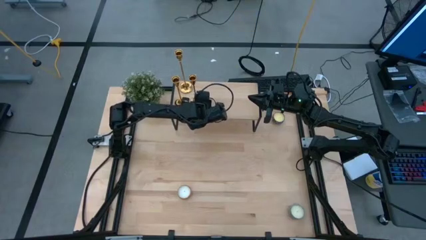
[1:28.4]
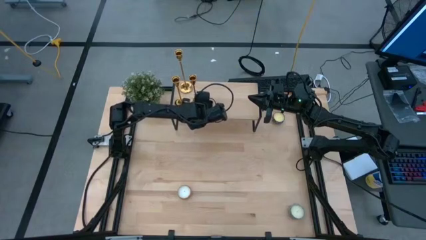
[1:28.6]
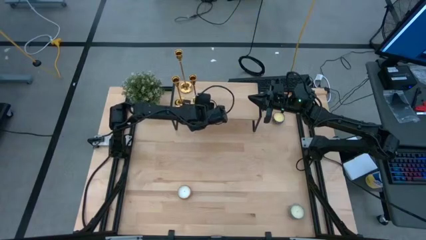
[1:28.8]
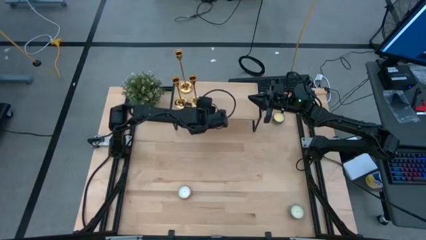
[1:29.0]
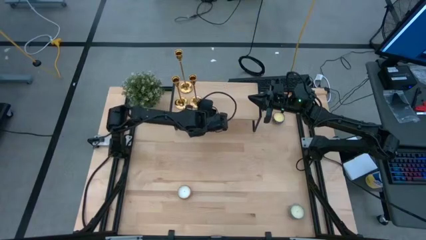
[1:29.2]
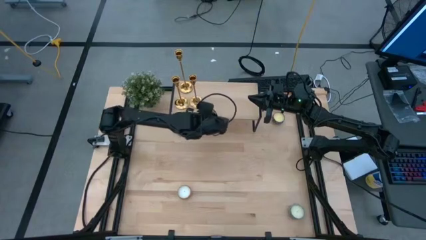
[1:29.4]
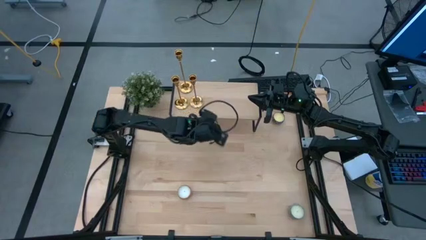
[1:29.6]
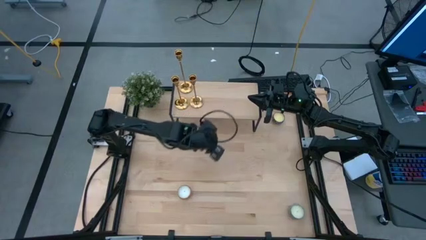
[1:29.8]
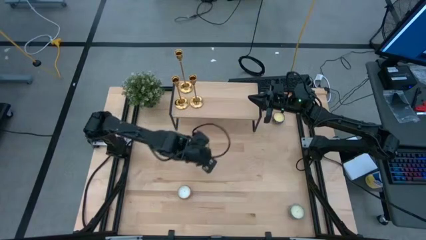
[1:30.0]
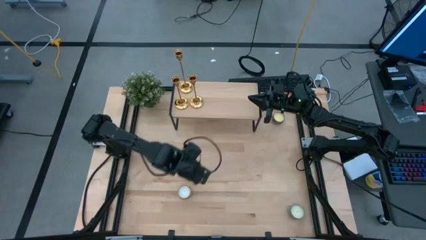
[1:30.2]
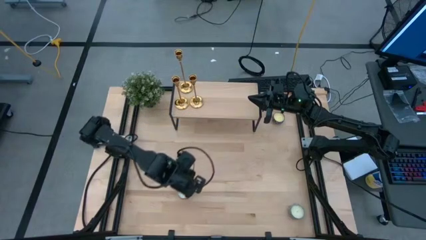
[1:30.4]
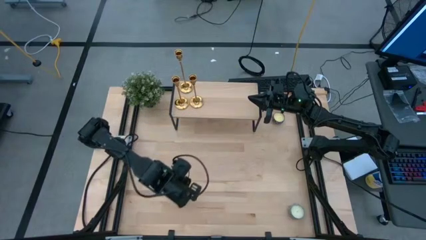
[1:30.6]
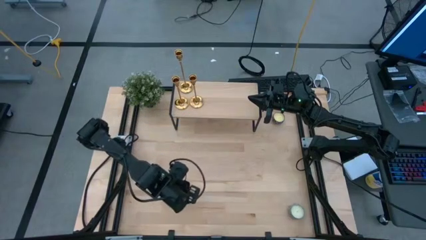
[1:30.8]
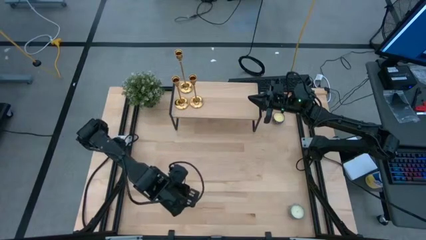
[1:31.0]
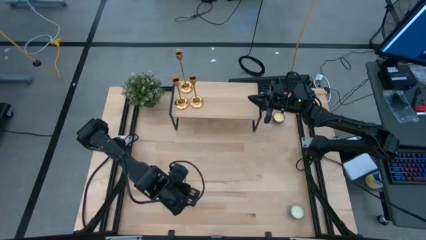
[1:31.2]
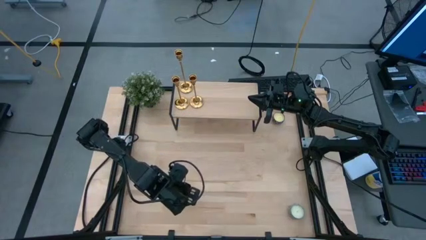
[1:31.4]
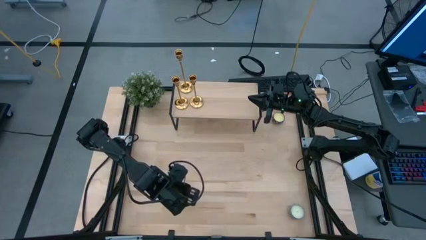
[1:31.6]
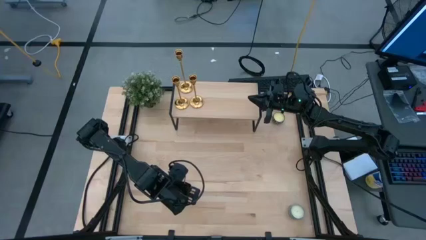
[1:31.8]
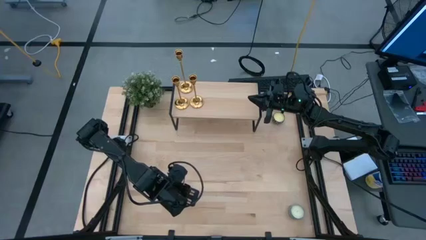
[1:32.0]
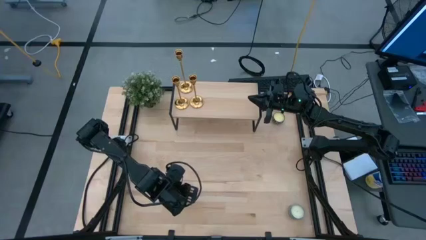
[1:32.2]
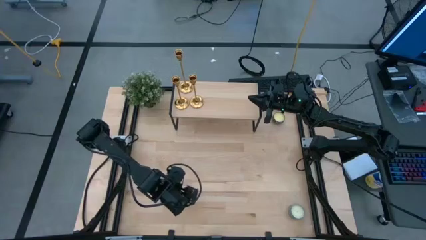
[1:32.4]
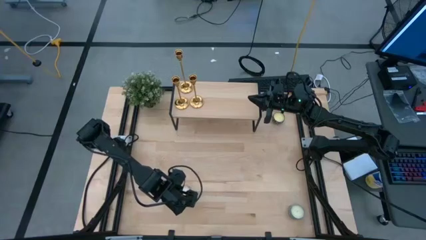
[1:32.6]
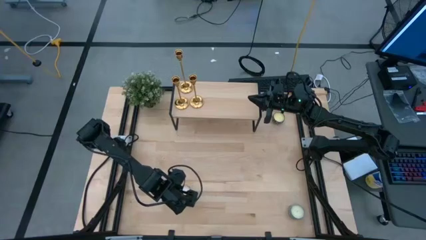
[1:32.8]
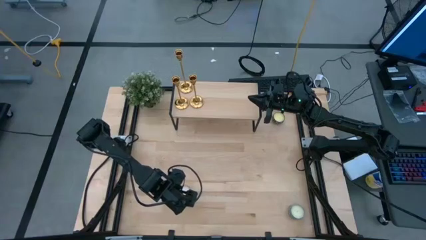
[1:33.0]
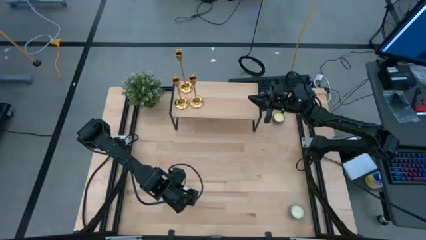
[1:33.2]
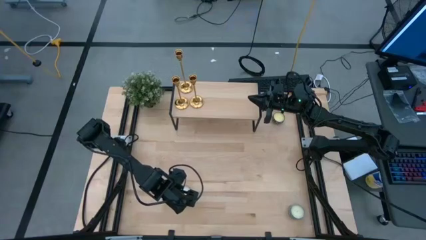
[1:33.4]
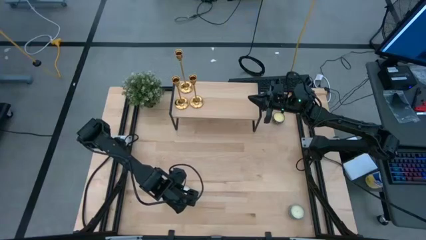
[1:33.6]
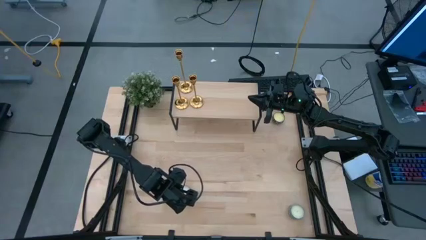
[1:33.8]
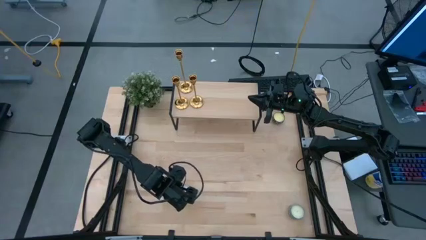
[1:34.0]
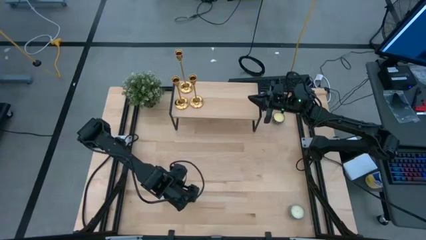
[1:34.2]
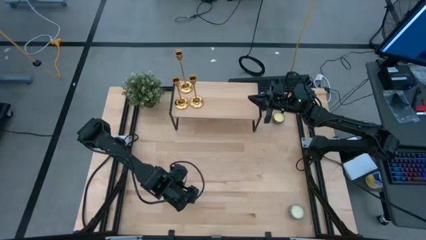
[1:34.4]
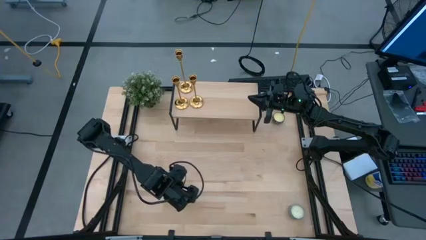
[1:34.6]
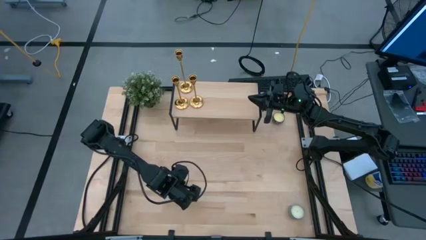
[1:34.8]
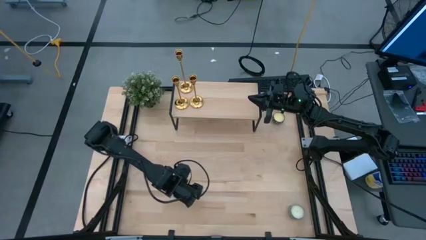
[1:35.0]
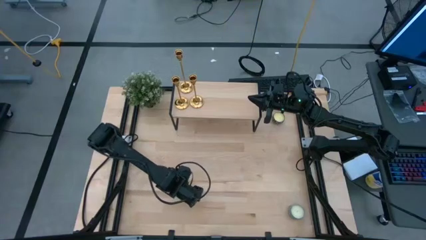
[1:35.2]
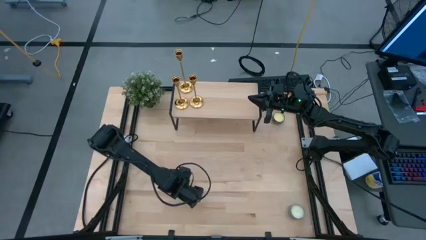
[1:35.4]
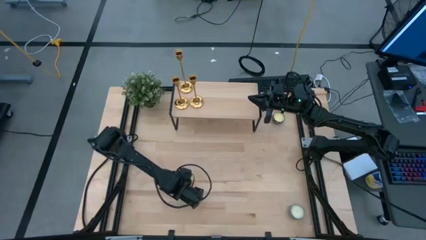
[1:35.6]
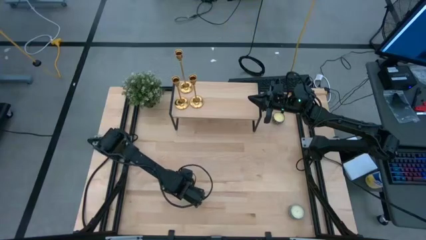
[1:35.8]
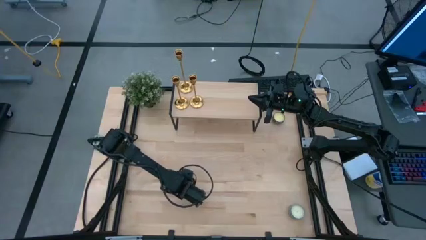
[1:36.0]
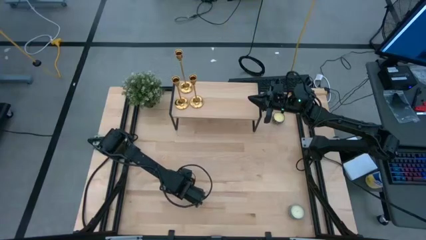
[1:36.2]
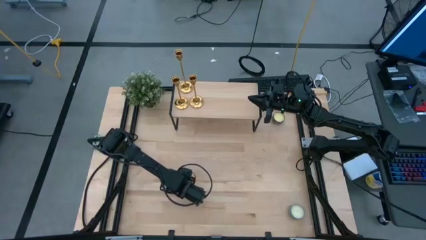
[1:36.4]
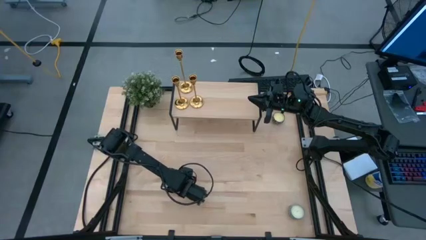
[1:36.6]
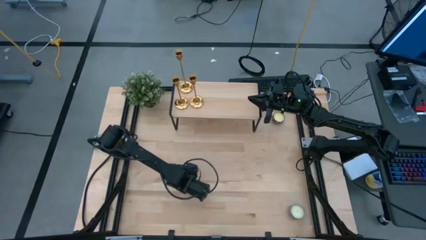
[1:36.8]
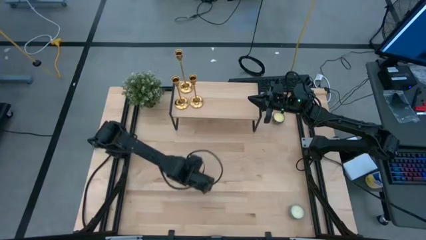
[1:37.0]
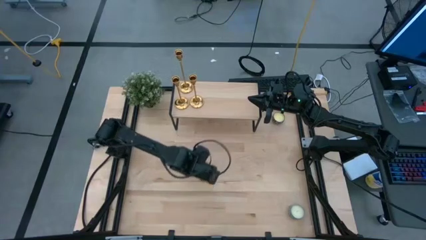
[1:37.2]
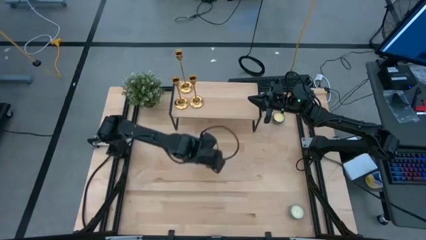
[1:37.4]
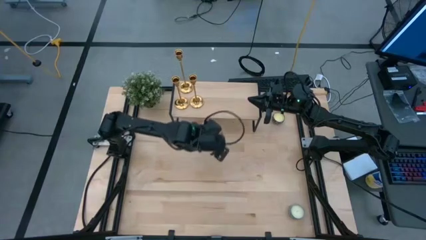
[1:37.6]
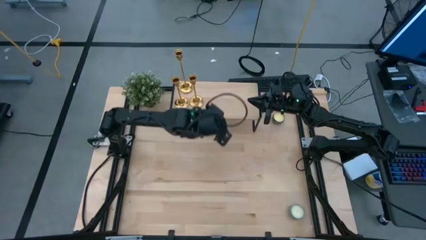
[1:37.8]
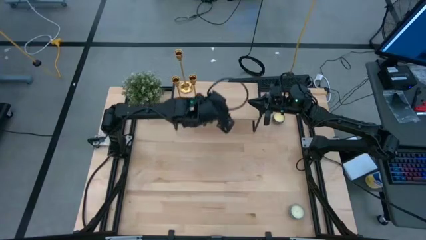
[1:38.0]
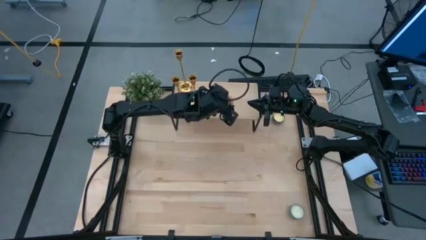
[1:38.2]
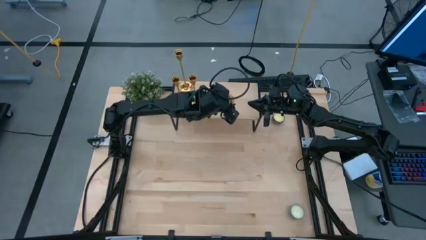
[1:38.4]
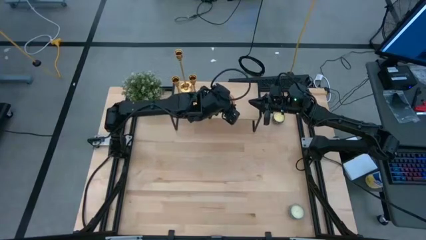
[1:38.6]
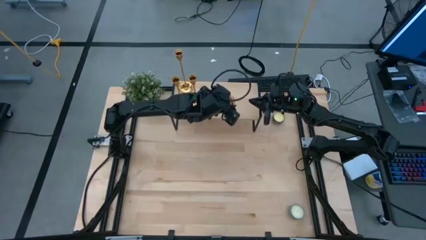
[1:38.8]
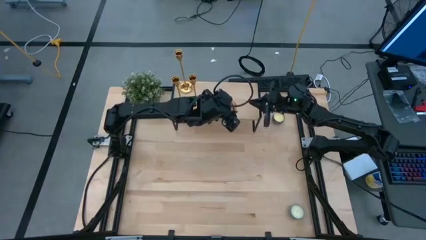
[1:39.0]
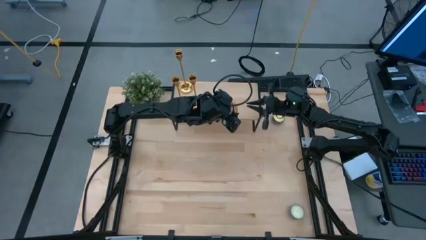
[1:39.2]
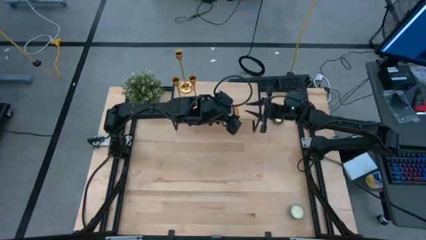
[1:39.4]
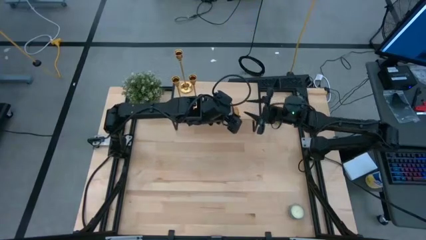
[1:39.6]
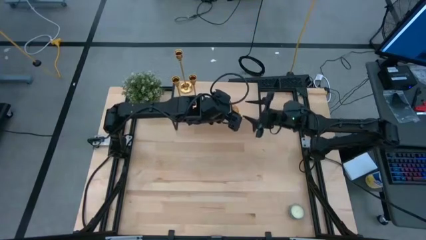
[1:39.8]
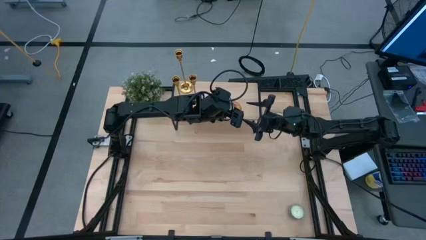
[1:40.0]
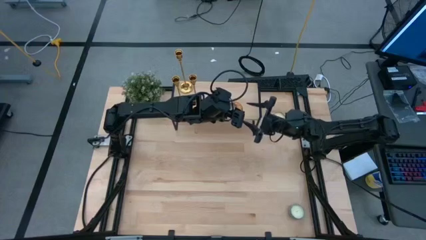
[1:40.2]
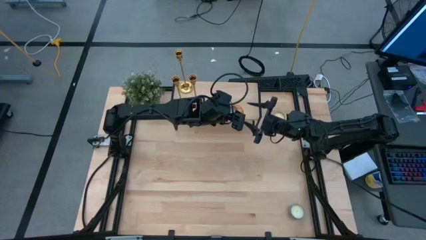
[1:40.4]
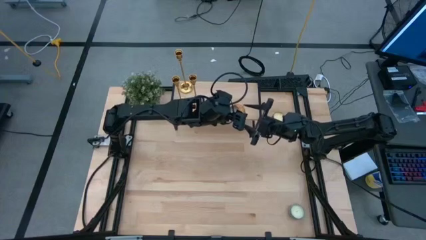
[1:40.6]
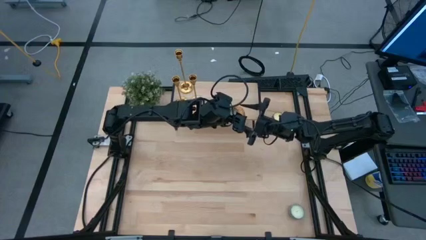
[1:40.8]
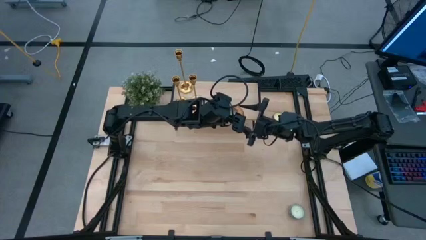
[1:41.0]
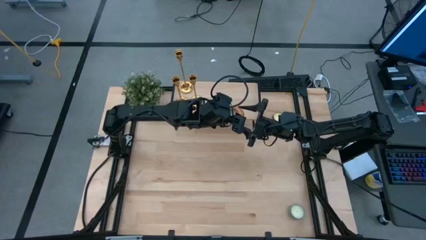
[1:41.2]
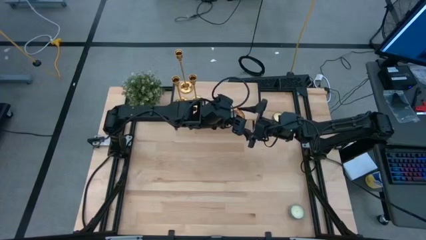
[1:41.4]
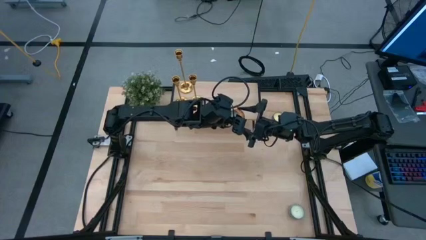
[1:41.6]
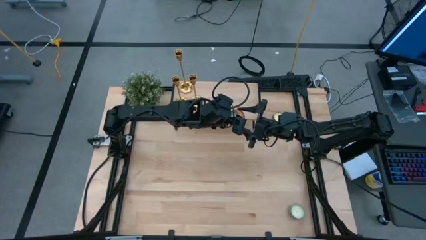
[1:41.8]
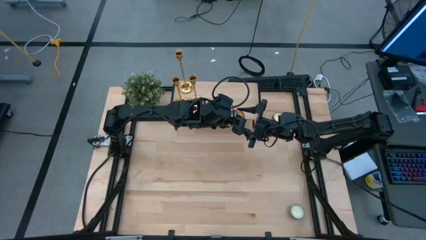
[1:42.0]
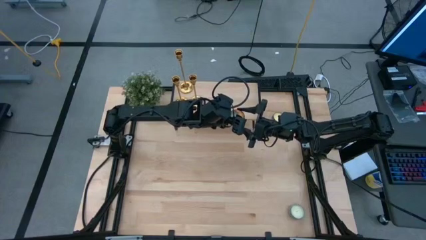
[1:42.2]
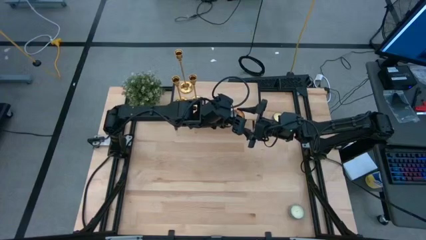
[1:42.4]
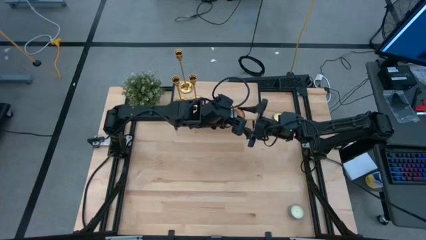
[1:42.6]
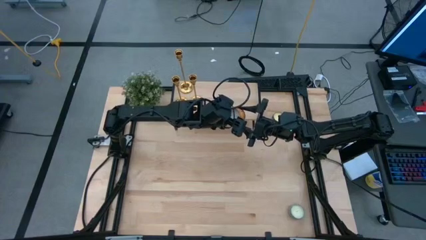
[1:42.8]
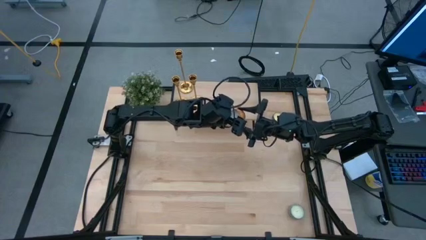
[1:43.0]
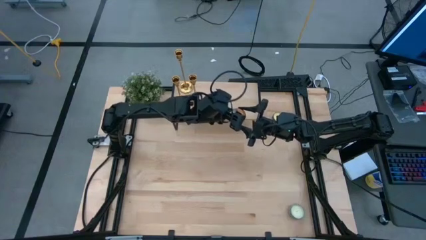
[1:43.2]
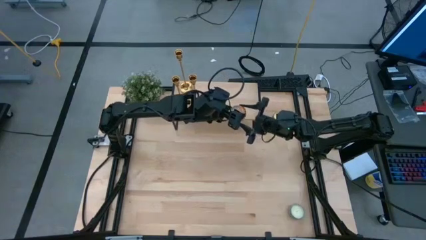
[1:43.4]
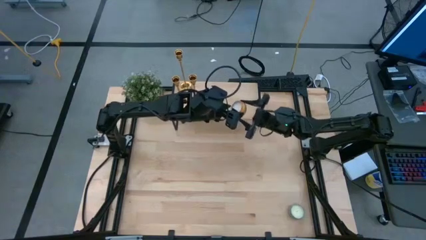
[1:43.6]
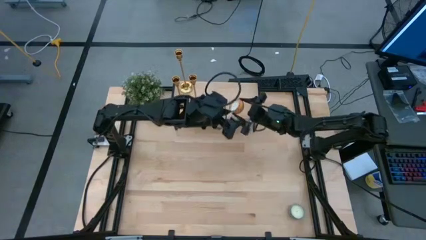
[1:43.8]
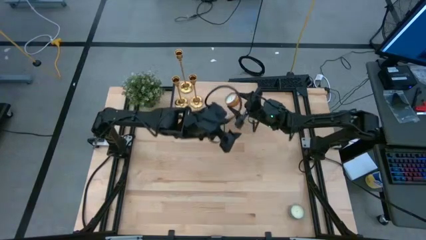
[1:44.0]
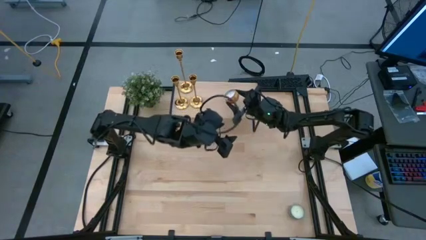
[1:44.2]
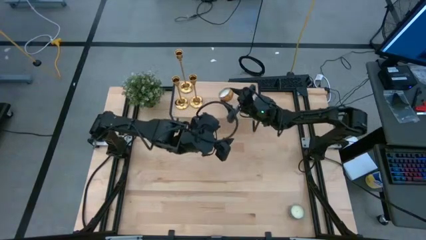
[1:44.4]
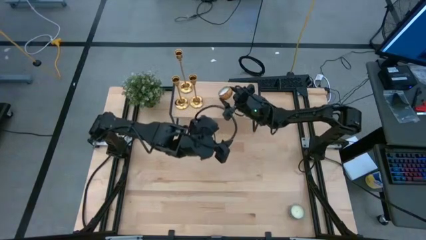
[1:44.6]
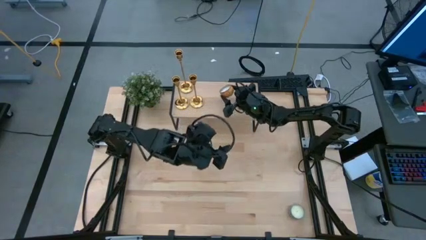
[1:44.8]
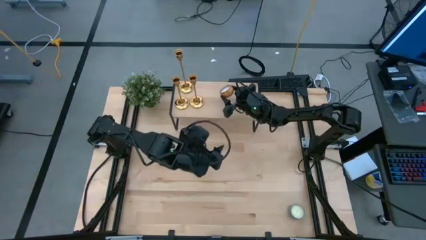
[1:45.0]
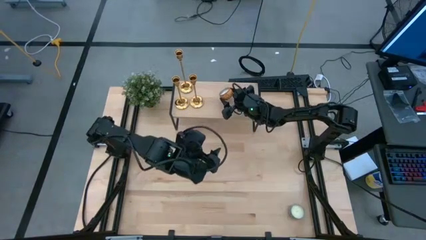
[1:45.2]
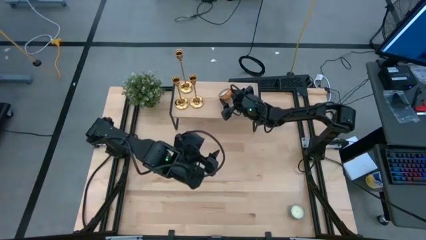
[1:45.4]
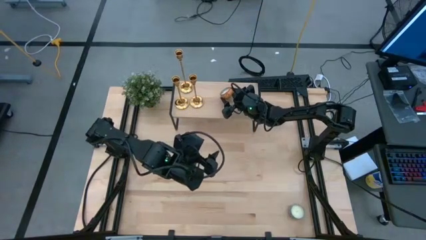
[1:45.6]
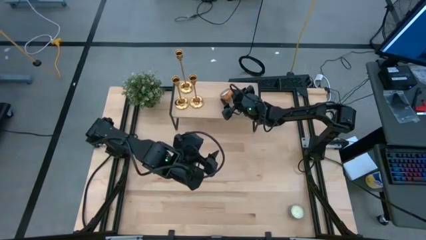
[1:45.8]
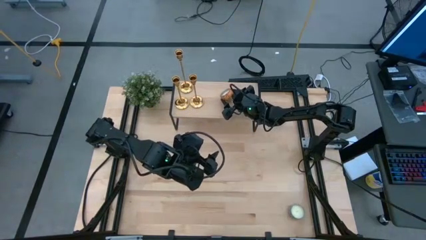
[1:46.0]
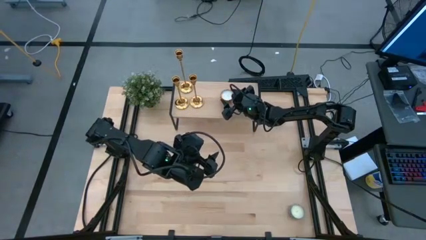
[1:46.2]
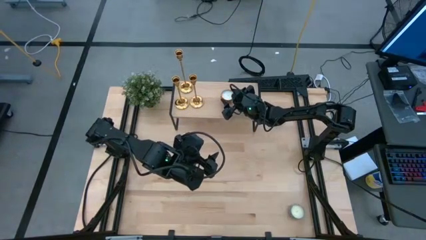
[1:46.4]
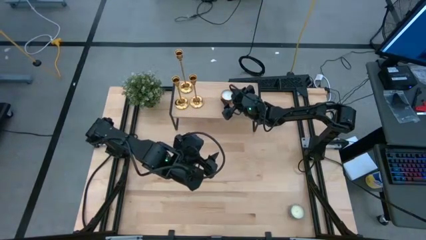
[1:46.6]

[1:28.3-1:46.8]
Task: Pick & Place candle stick holders
Put the orange patterned scented candle on the shelf
